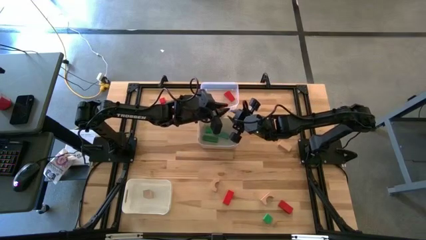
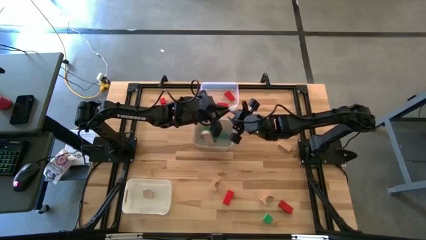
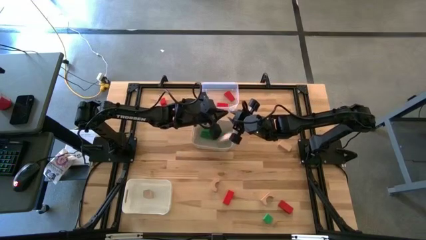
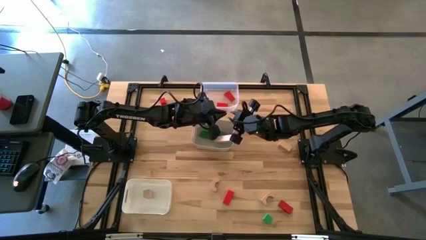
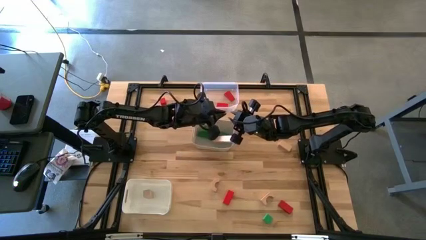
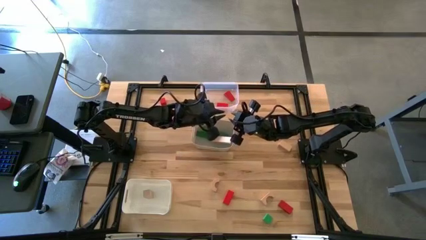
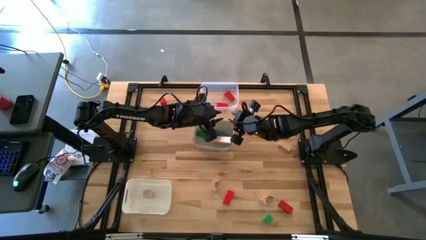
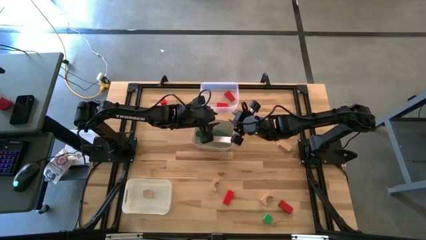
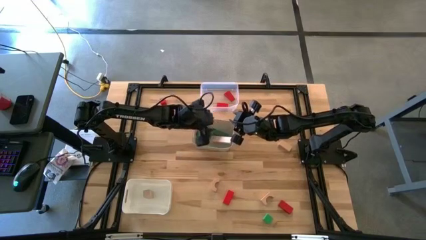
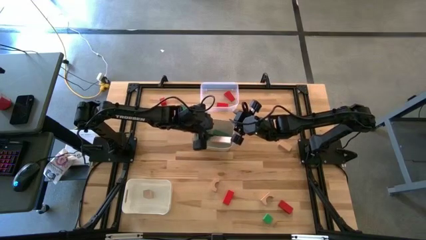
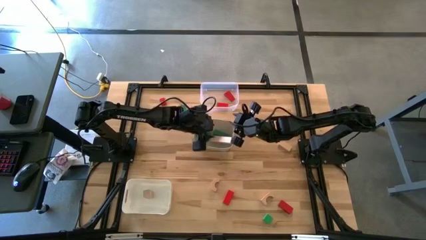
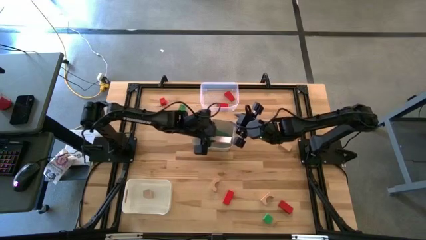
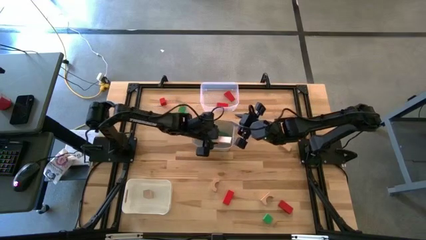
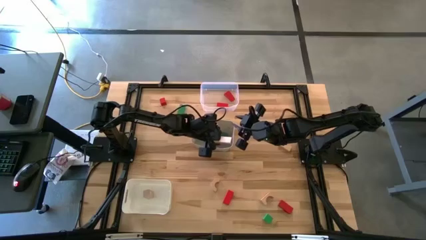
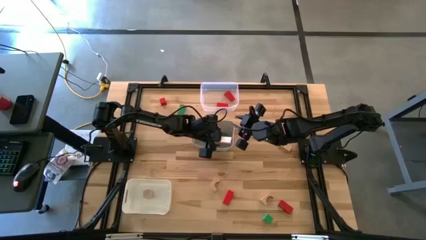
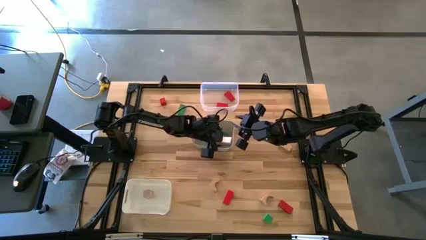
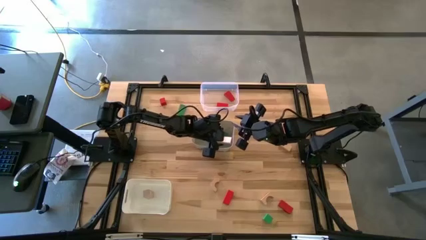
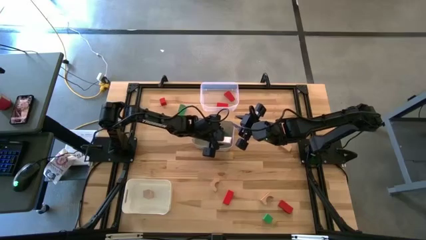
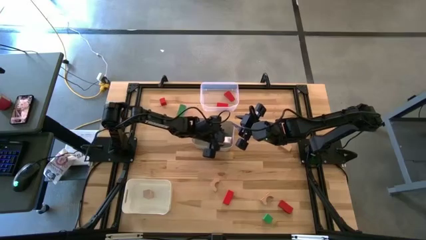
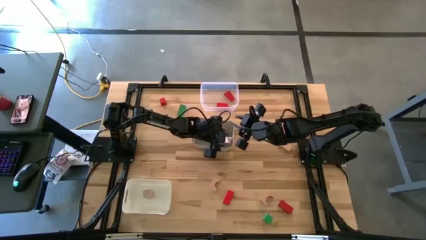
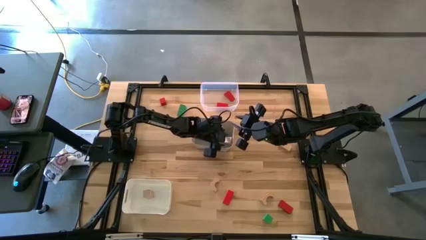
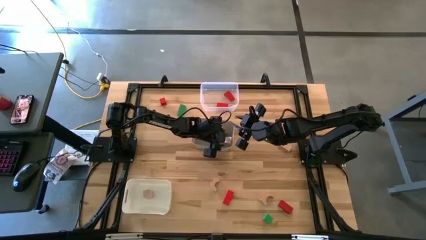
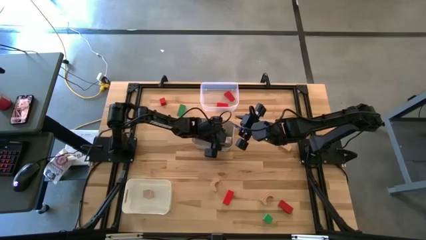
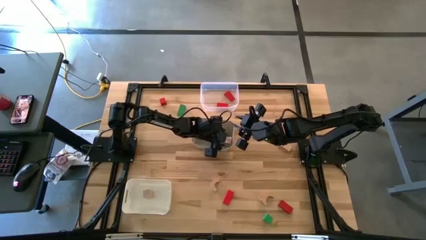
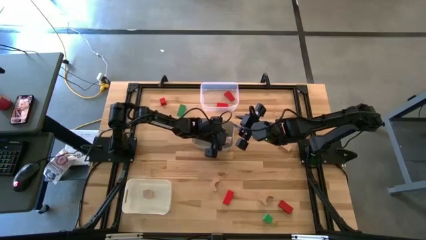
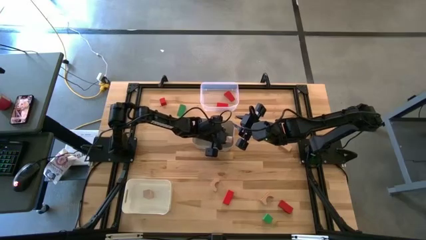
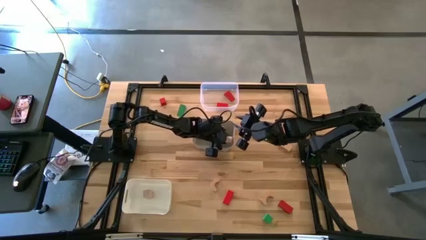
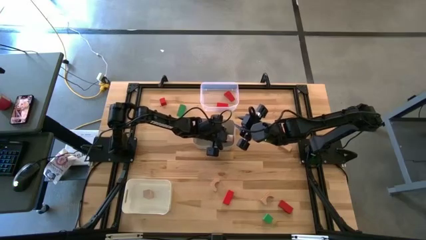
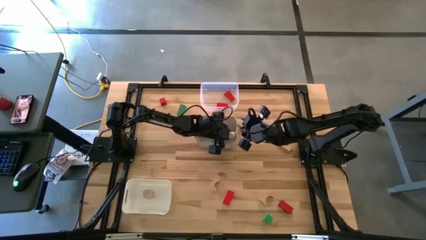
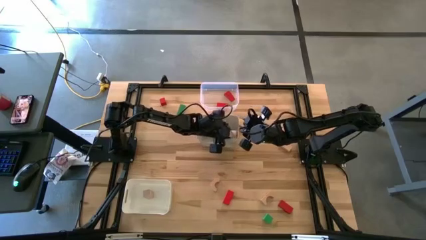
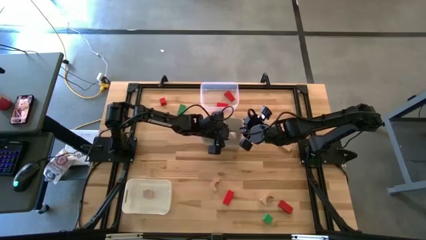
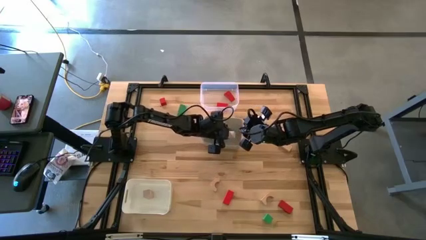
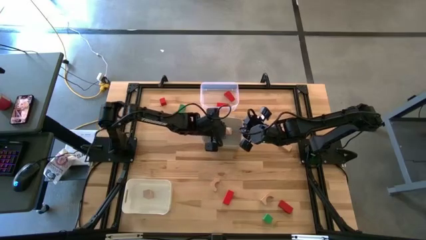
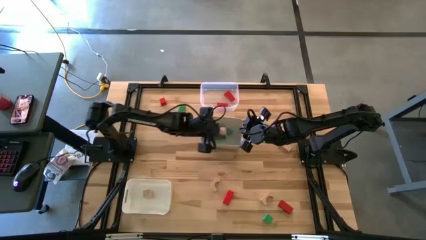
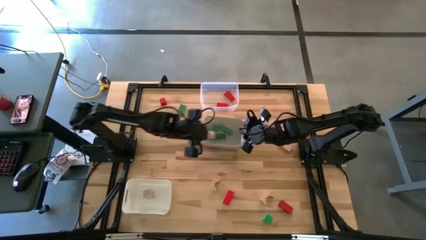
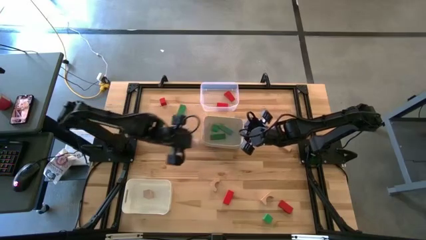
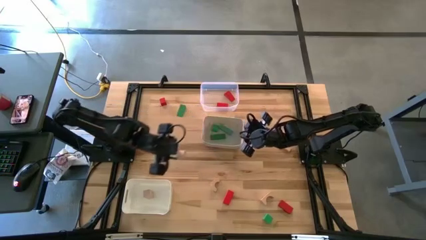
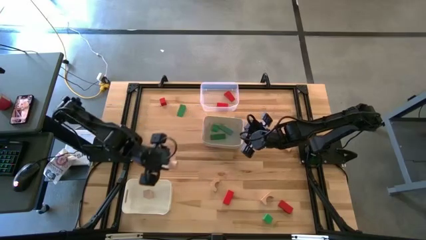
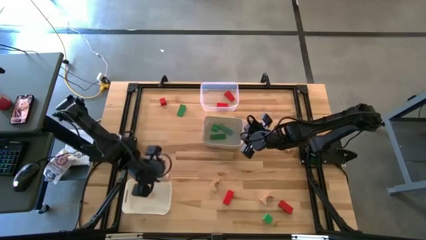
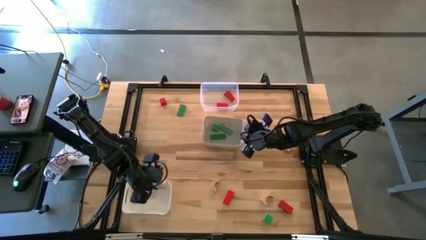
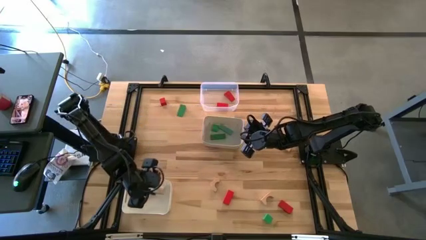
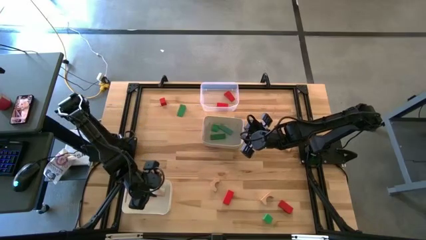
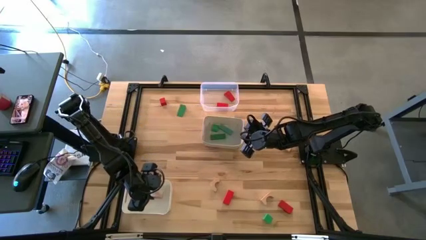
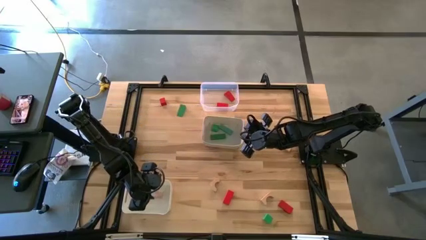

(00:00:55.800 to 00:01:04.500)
Task: Sort & place blocks by color
Put the top brown rectangular block into the bottom white bin

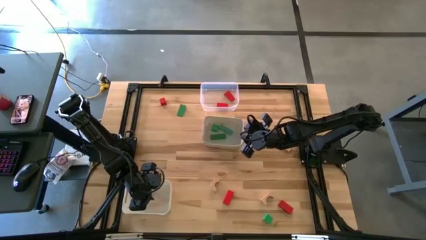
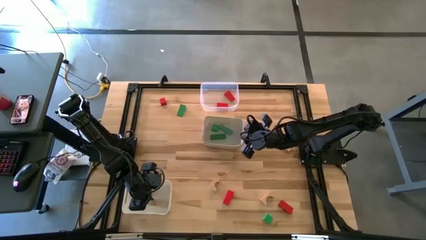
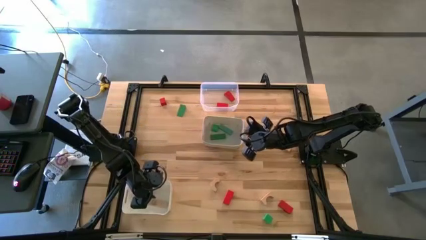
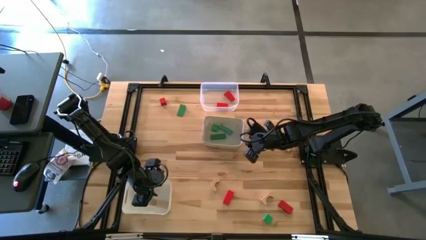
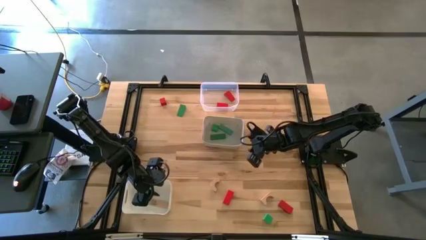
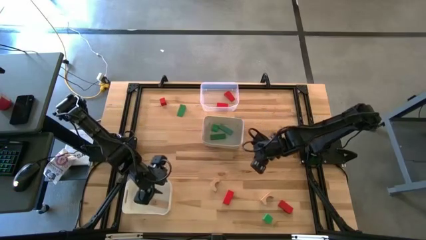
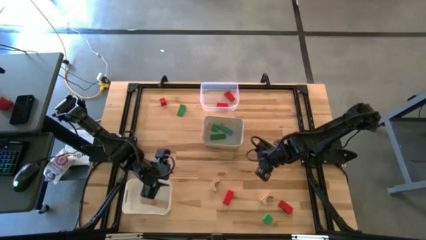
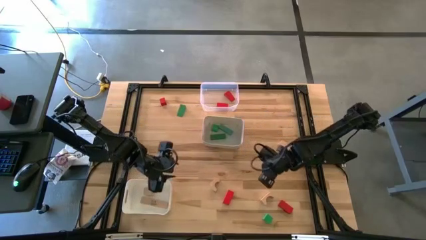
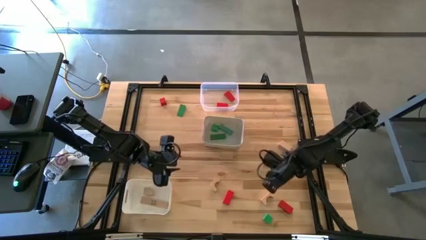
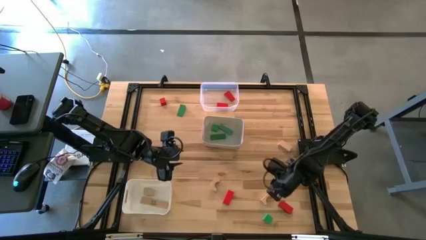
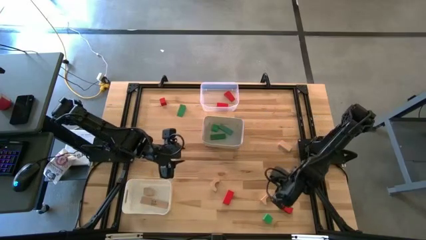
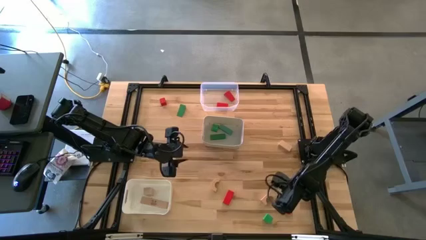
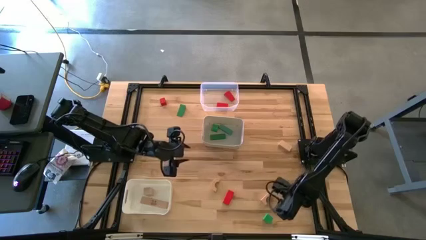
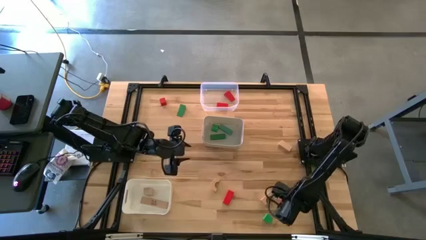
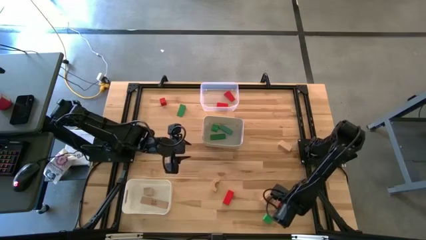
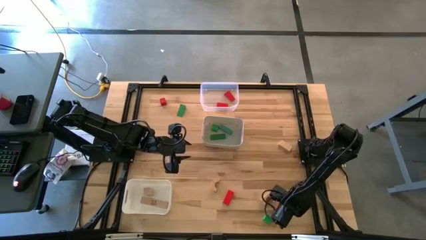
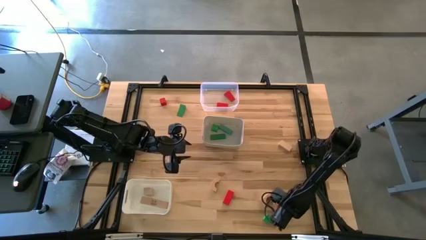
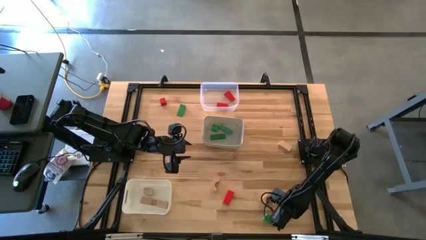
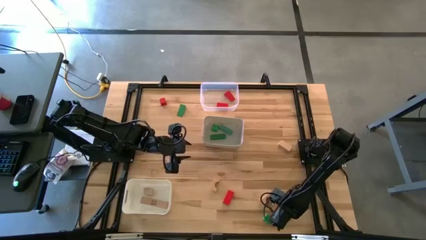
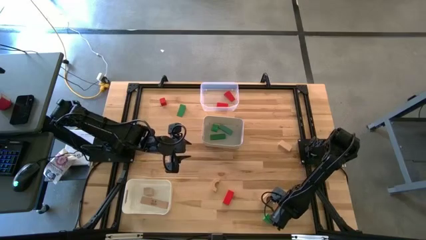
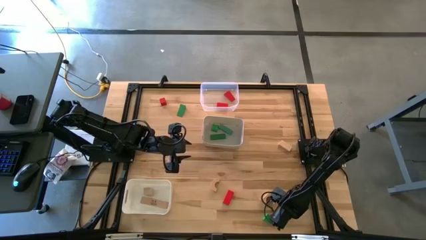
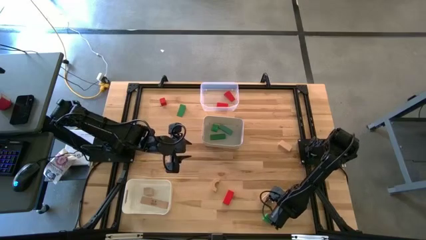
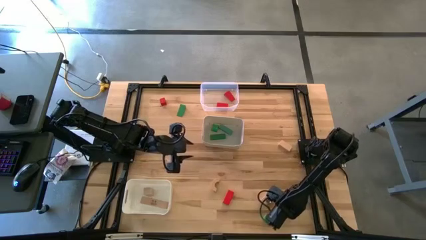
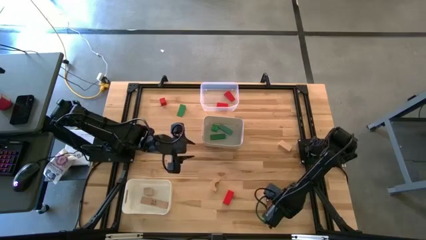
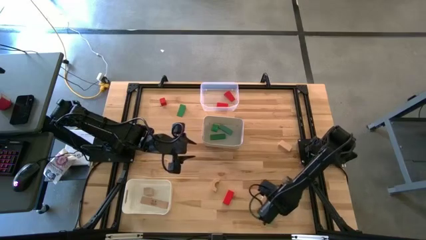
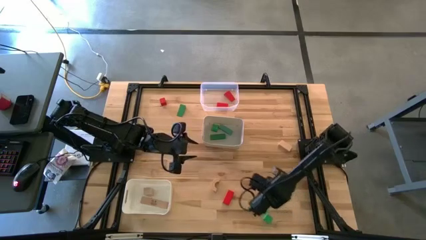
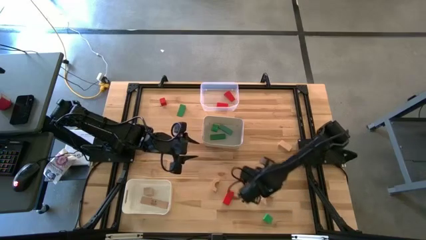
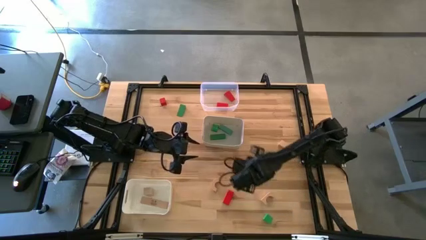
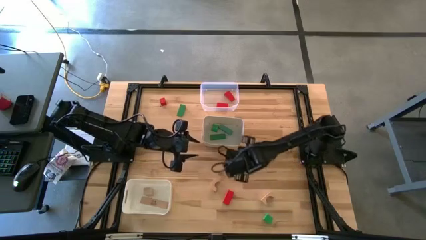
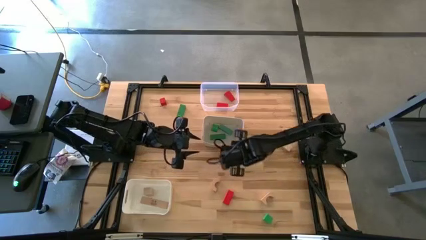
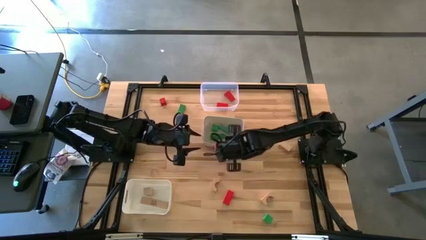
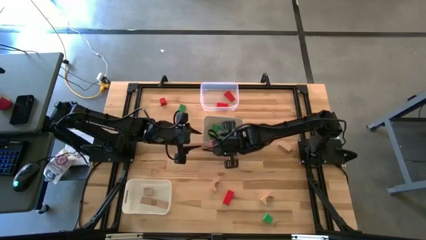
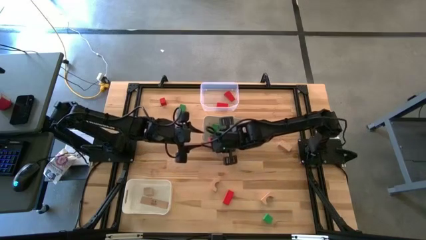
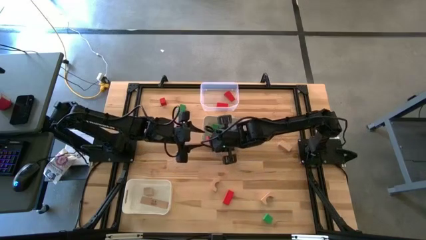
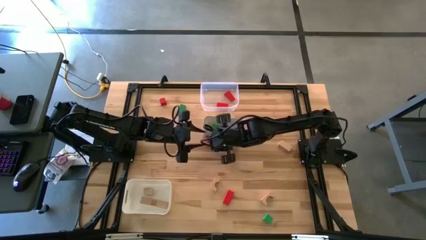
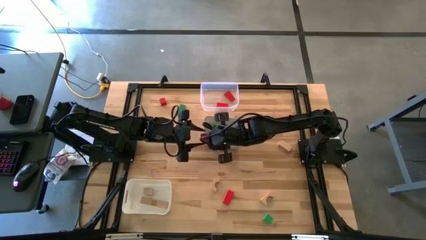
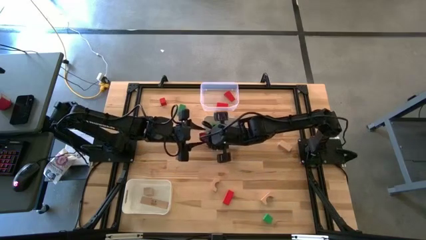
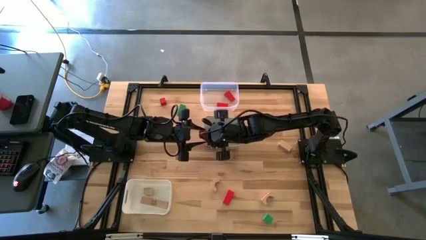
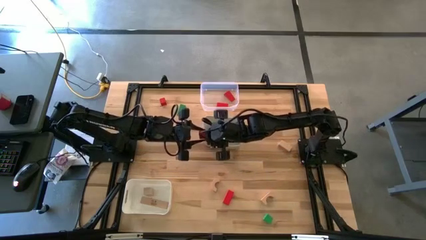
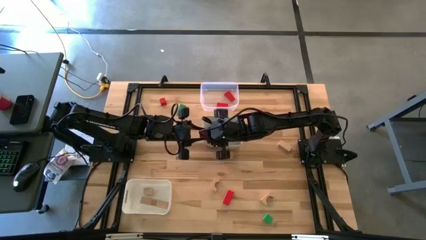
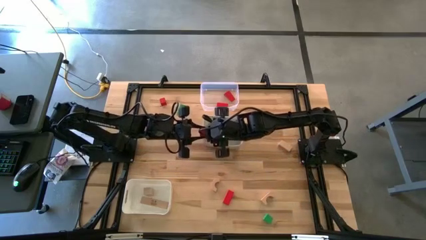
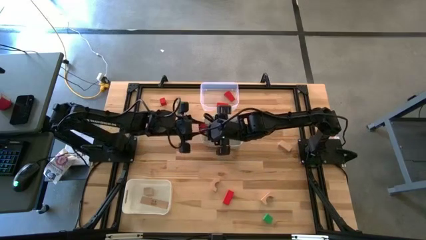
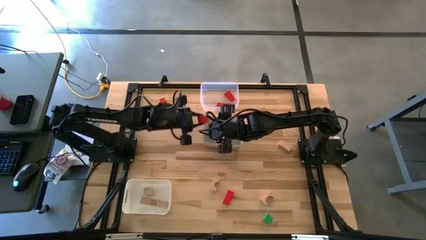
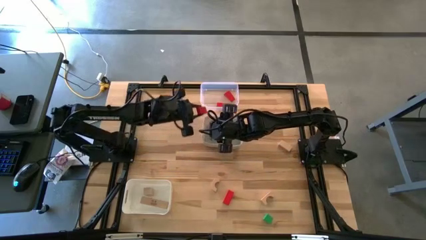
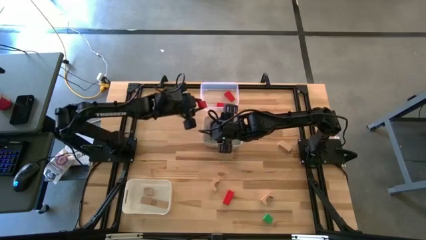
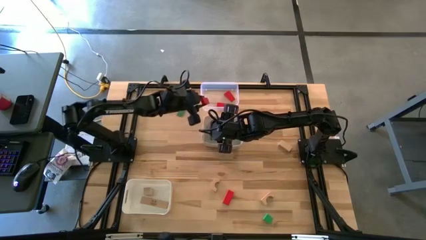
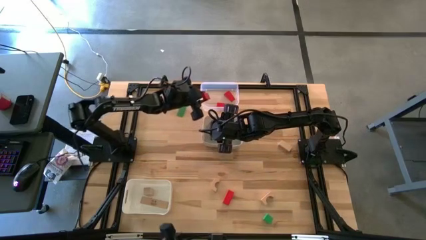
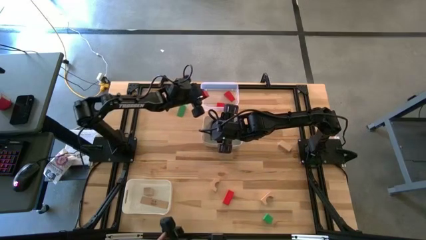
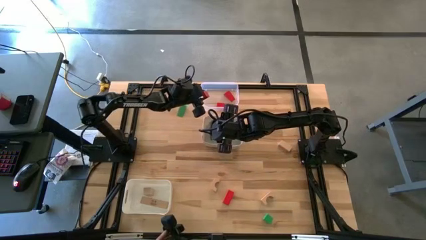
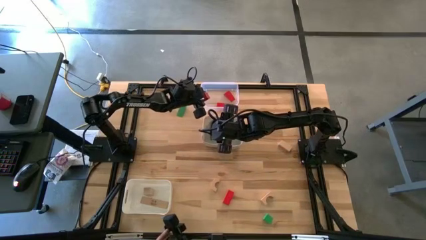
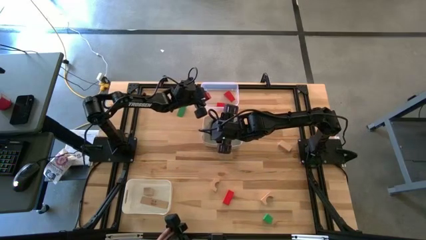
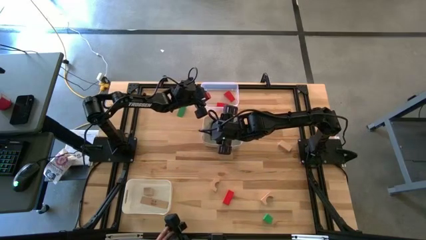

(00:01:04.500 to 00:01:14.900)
Put the right red rectangular block into the transparent bin
